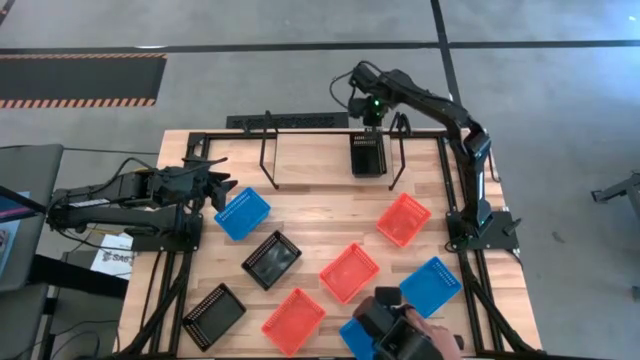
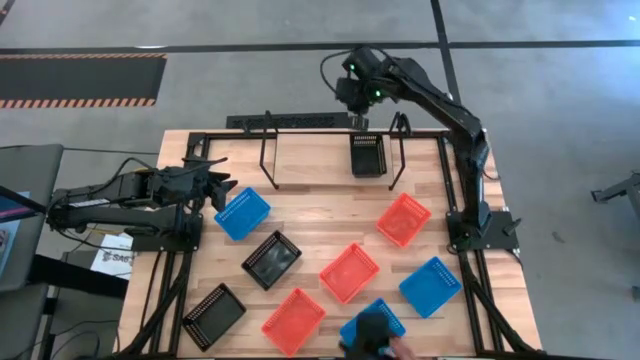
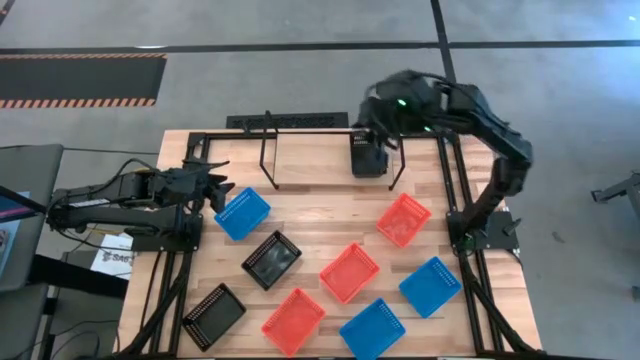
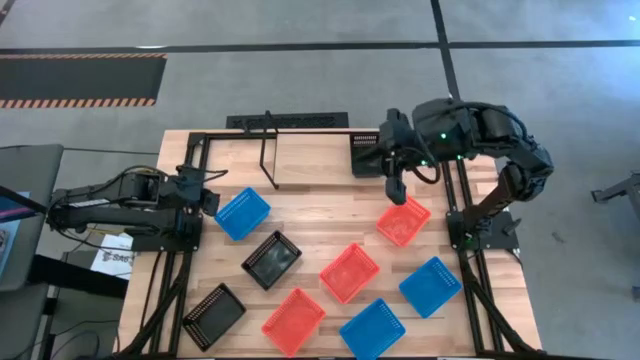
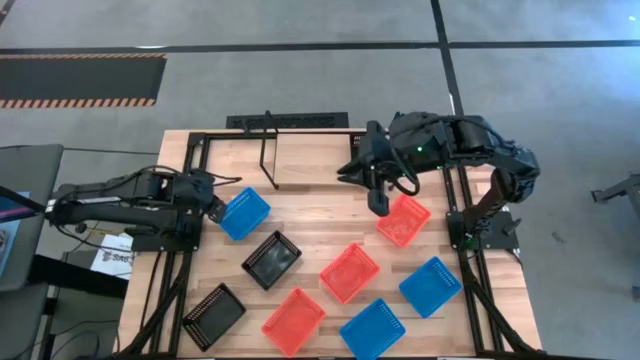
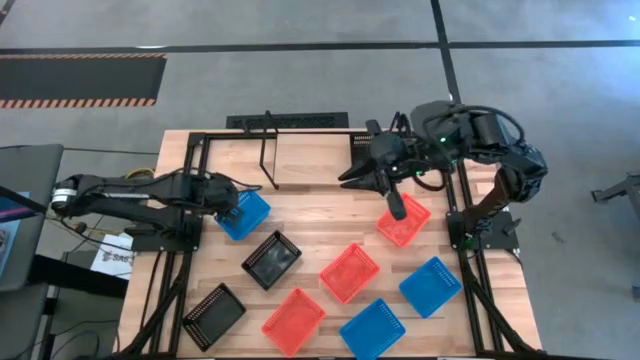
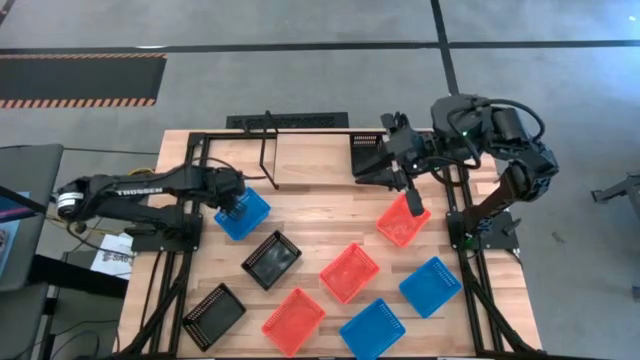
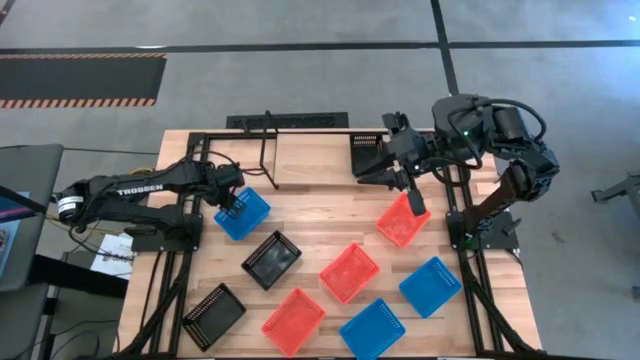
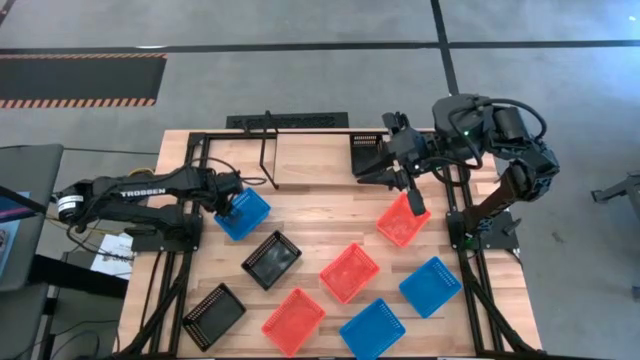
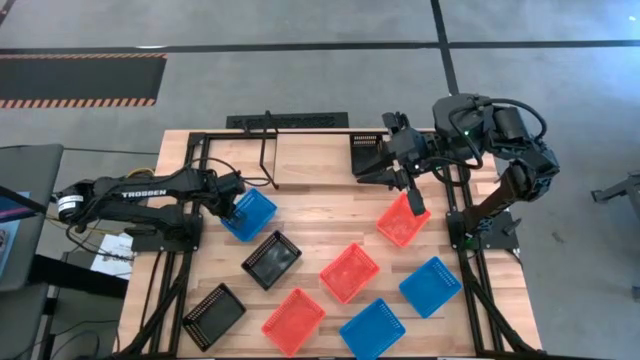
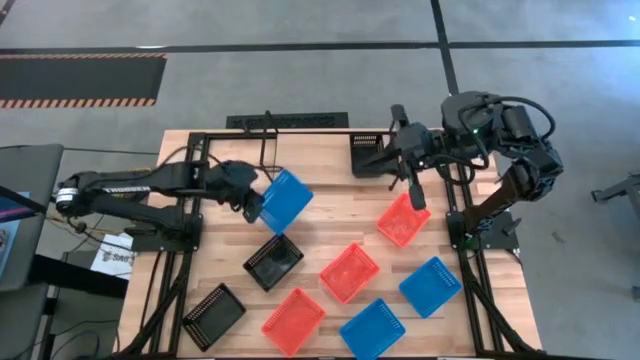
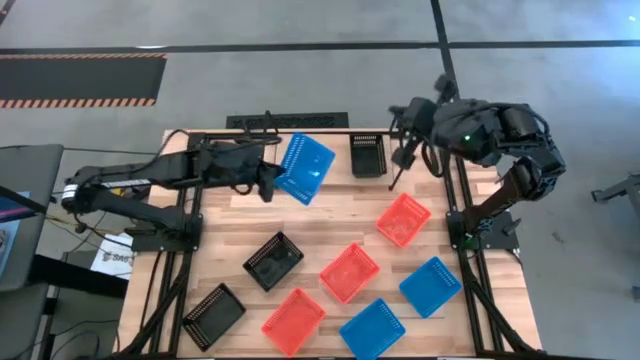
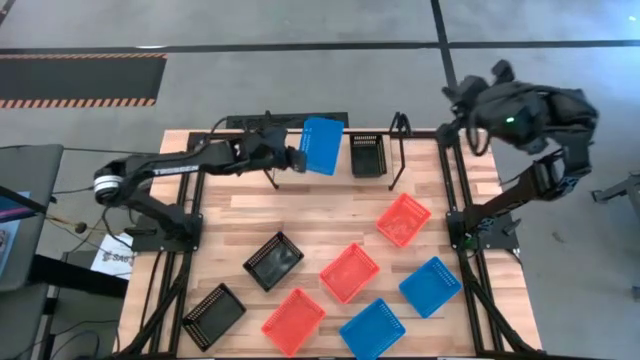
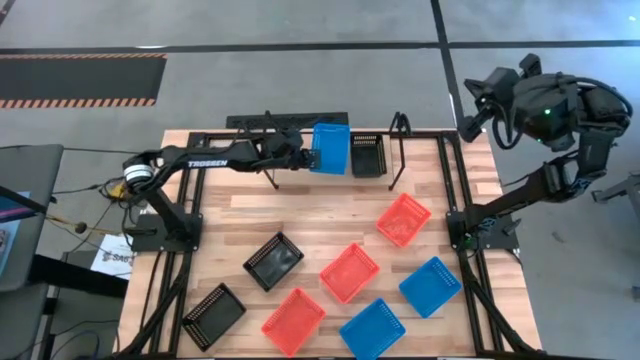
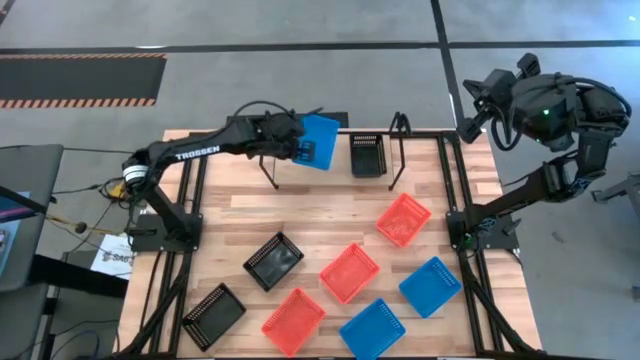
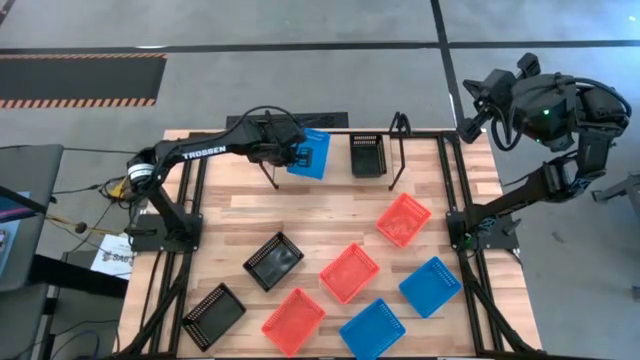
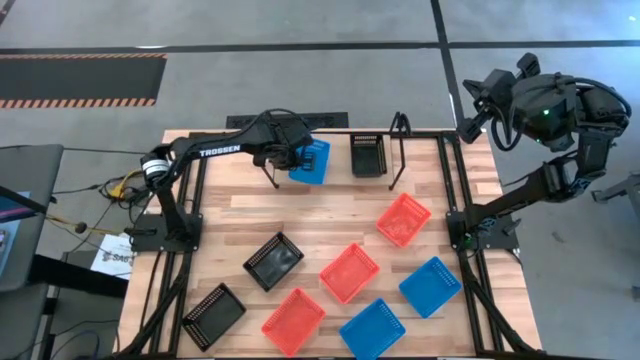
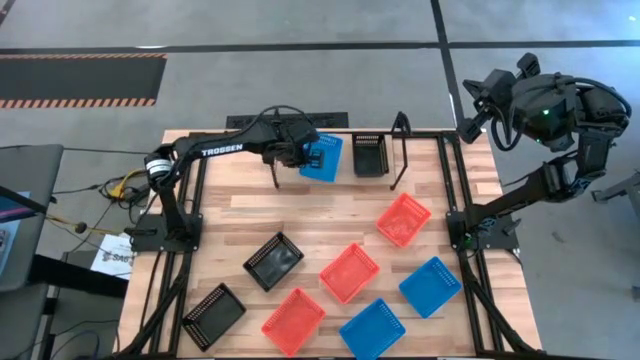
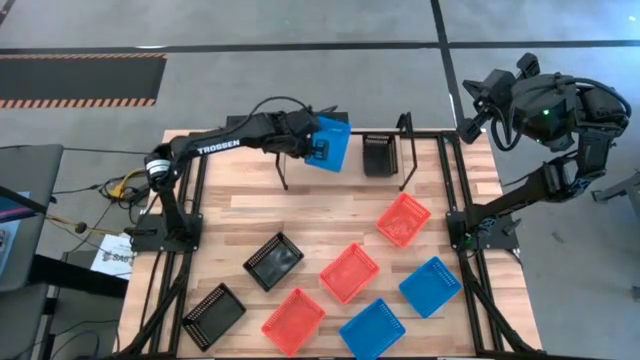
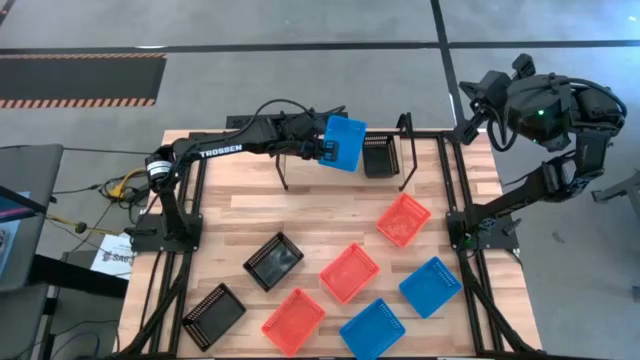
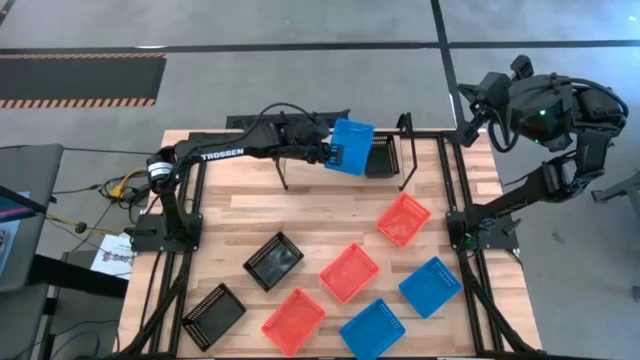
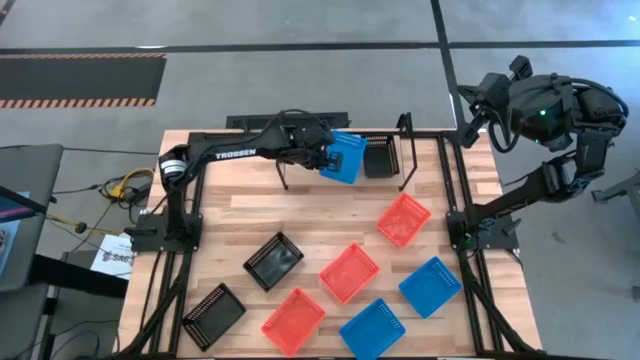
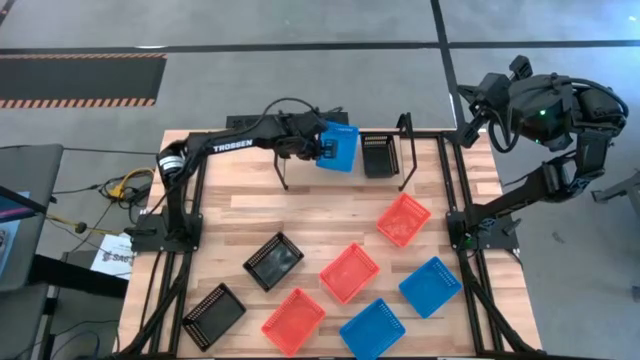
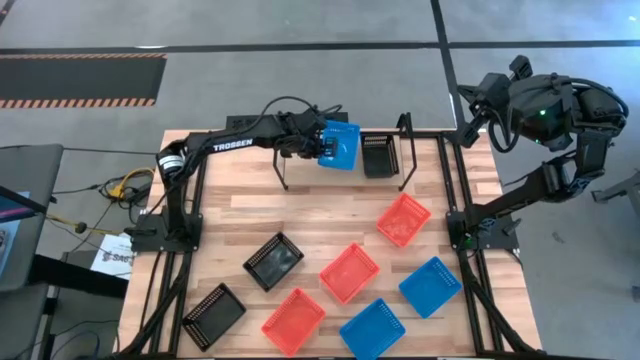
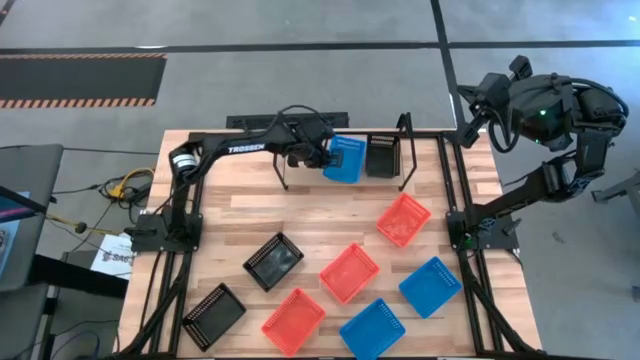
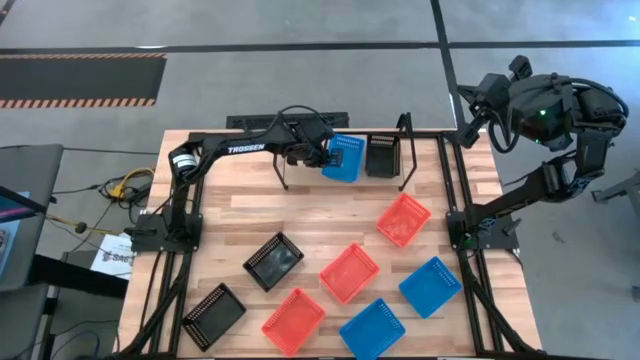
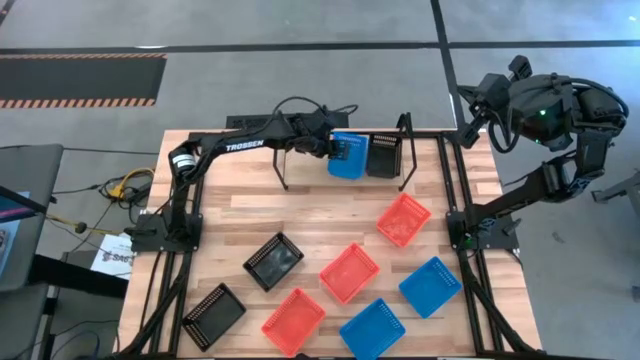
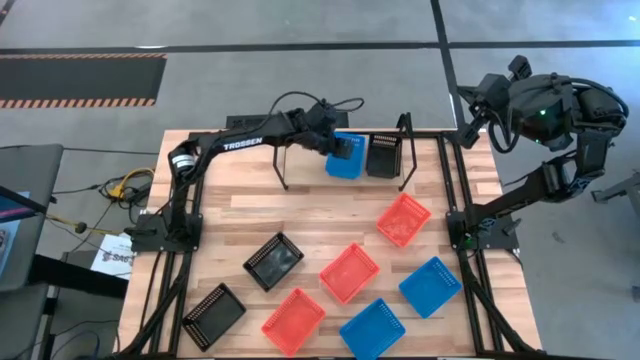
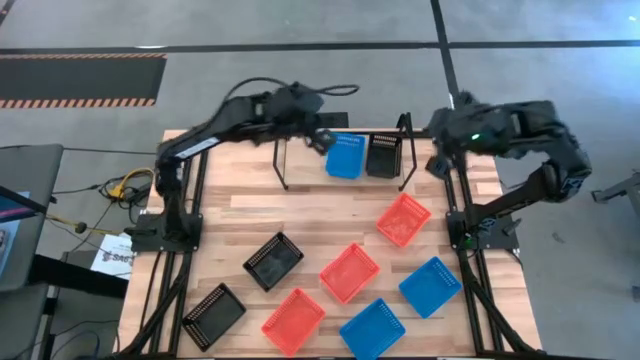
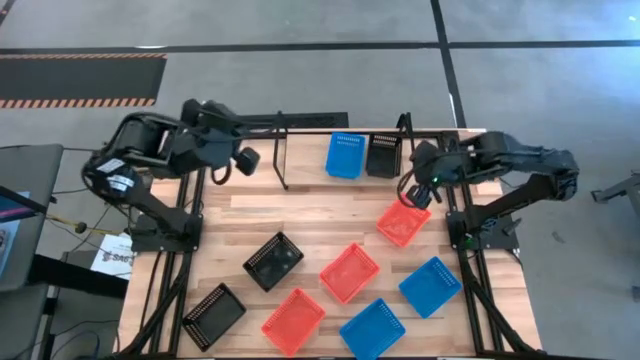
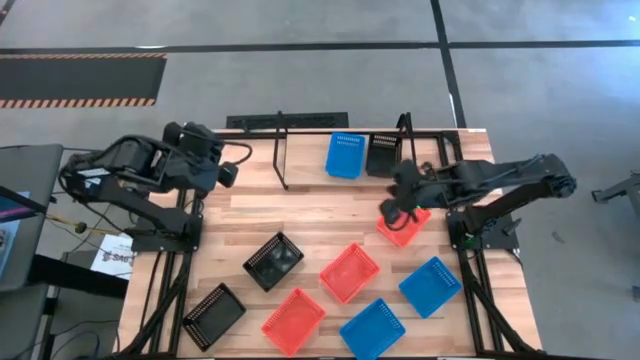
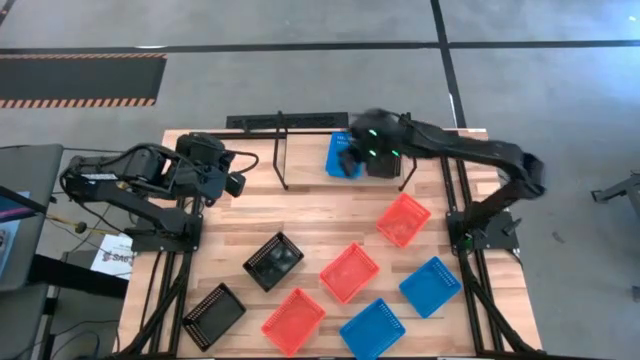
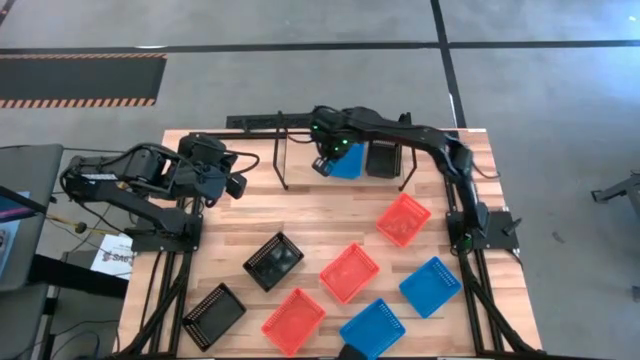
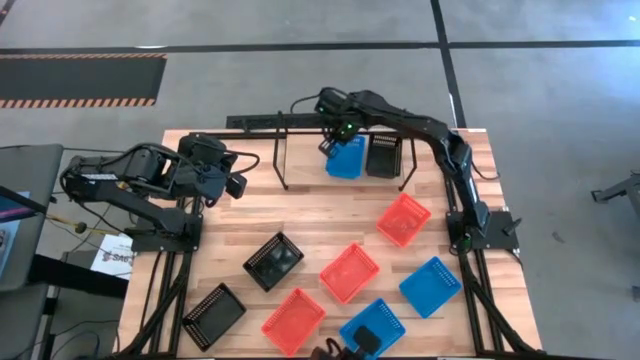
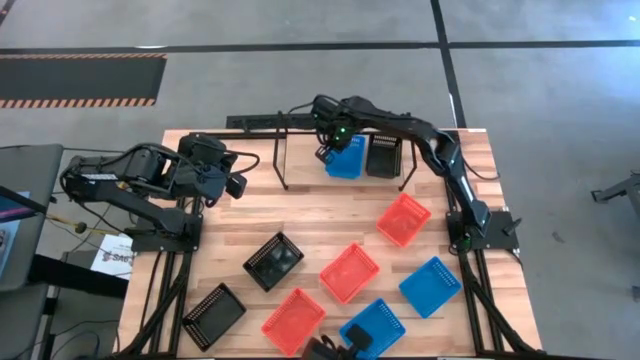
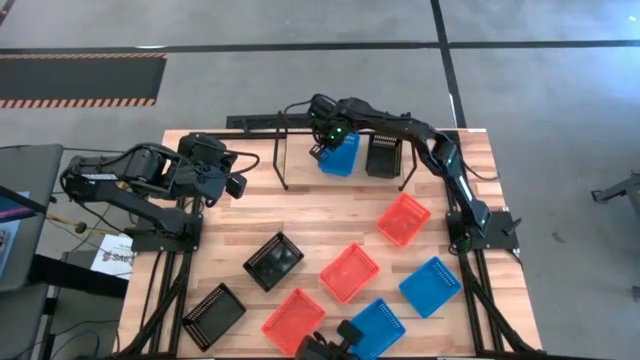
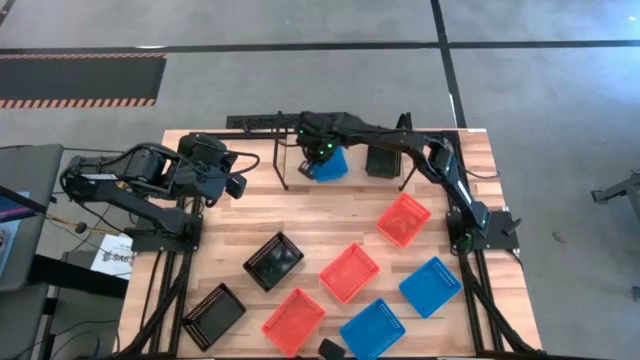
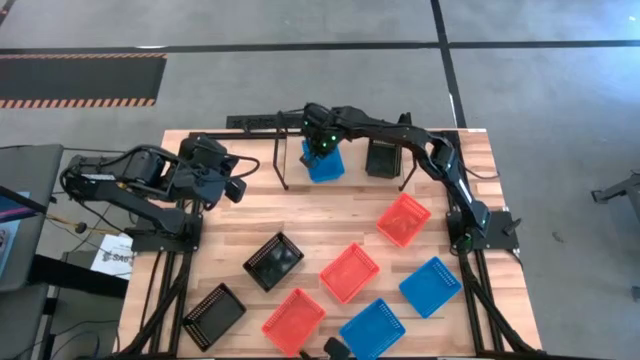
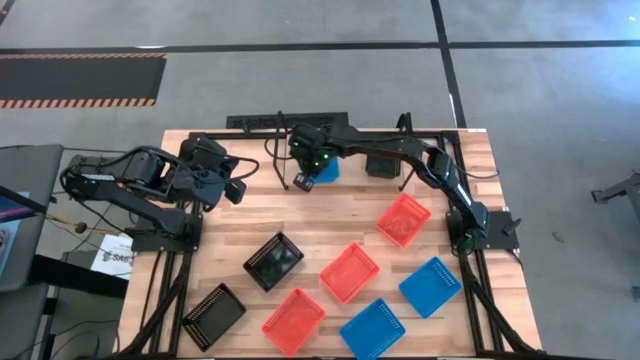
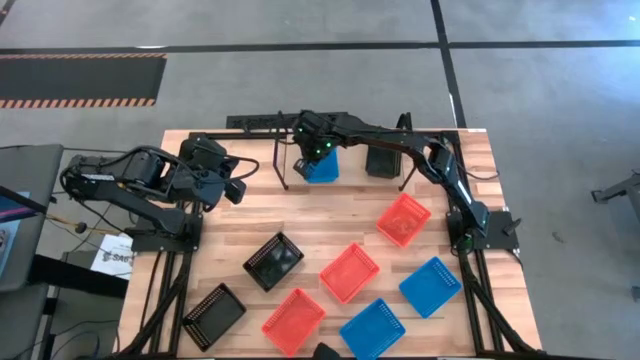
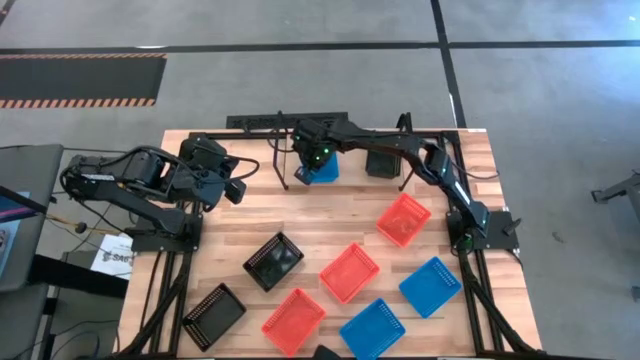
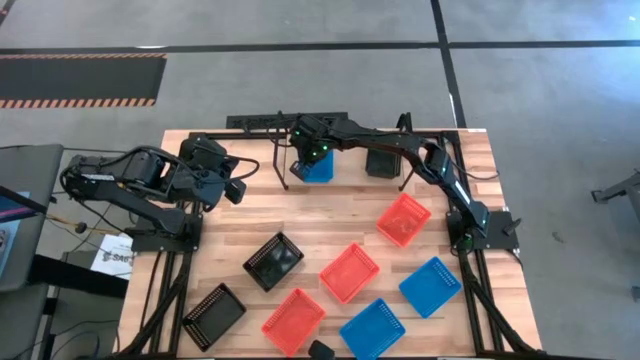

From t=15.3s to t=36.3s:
Task: Stack baskets on shelf by color
Put the top blue bin on the shelf
